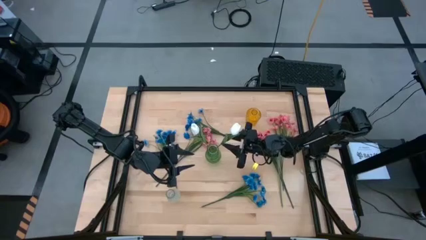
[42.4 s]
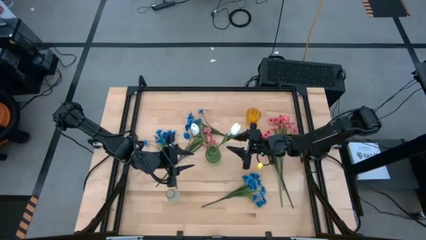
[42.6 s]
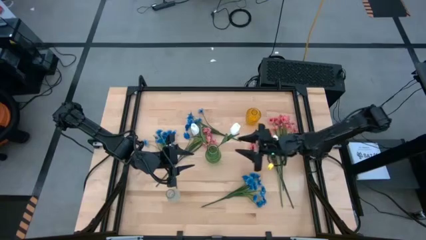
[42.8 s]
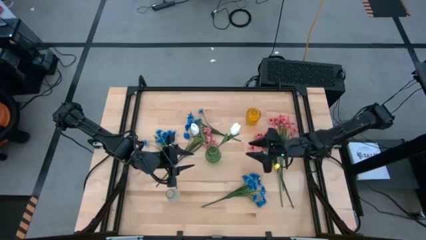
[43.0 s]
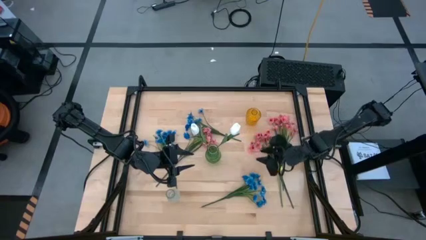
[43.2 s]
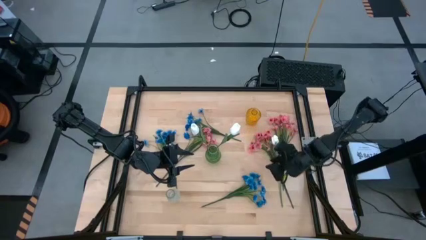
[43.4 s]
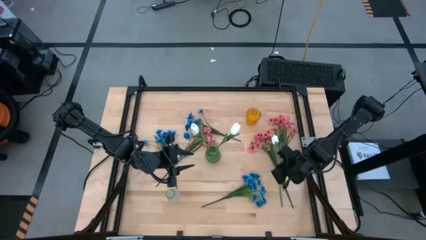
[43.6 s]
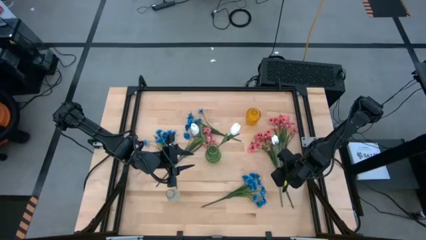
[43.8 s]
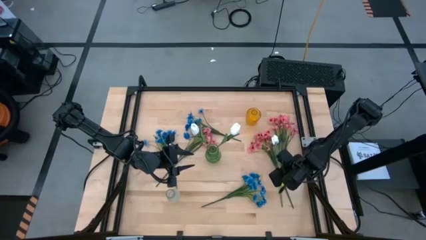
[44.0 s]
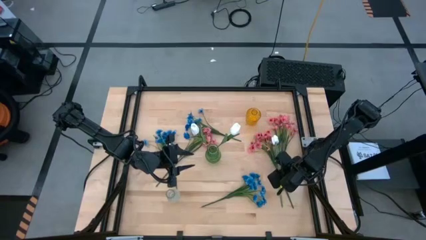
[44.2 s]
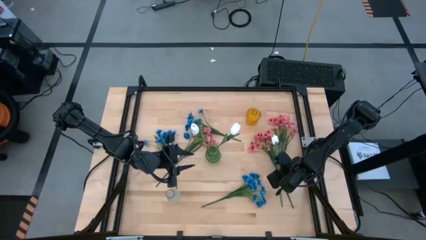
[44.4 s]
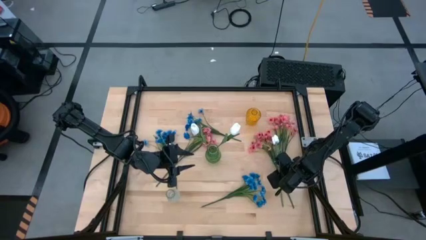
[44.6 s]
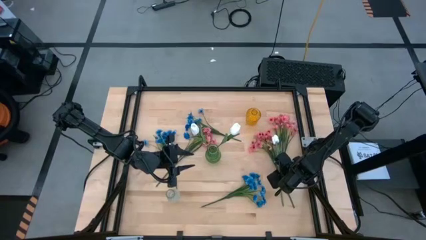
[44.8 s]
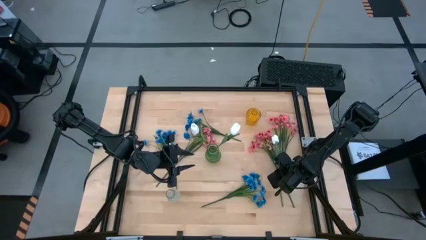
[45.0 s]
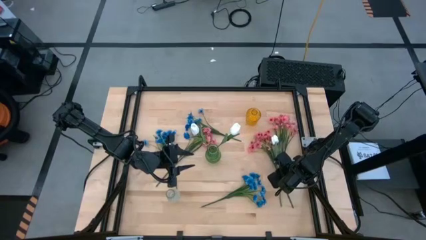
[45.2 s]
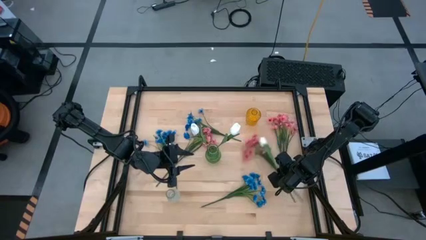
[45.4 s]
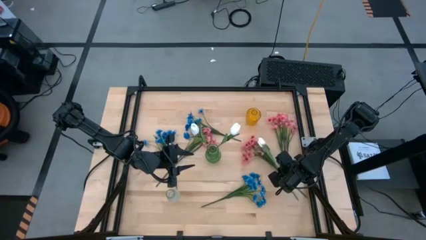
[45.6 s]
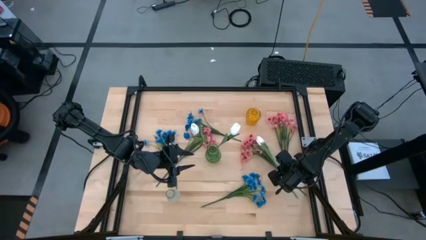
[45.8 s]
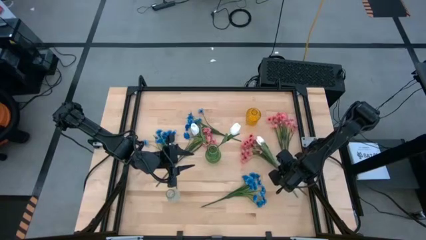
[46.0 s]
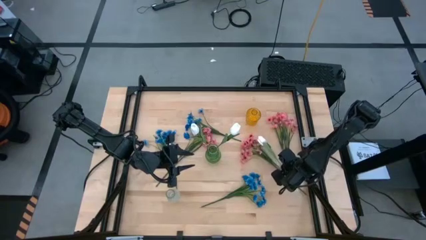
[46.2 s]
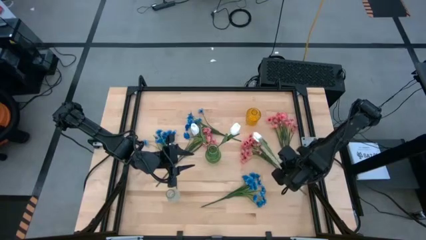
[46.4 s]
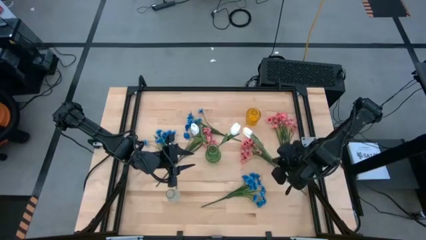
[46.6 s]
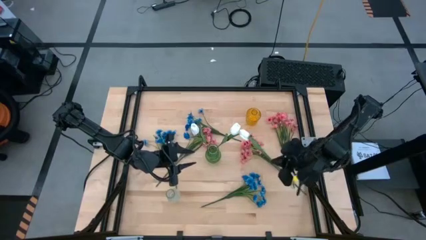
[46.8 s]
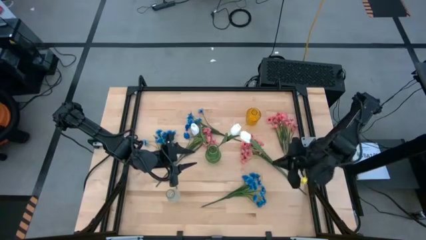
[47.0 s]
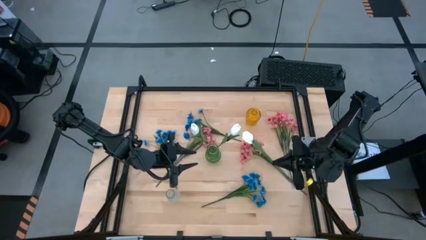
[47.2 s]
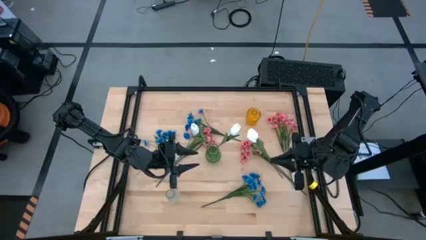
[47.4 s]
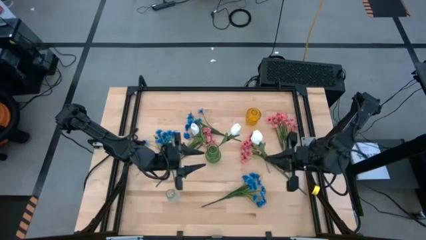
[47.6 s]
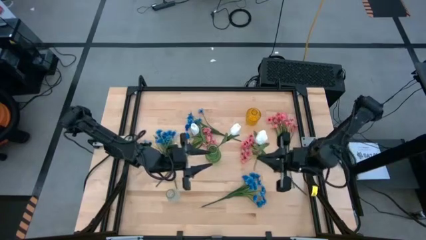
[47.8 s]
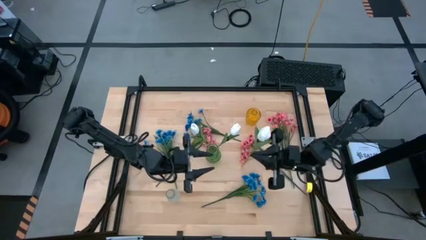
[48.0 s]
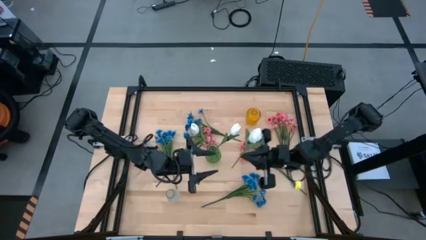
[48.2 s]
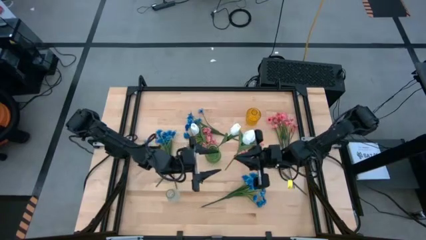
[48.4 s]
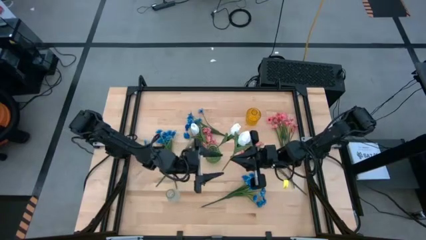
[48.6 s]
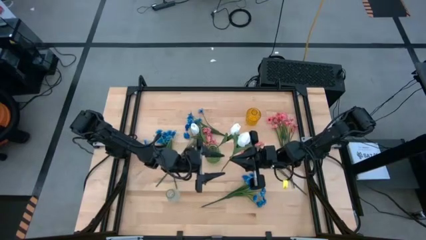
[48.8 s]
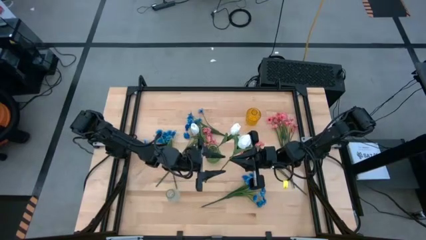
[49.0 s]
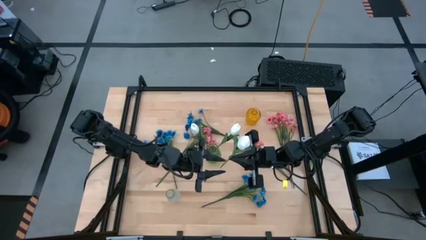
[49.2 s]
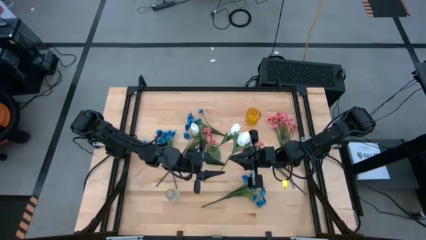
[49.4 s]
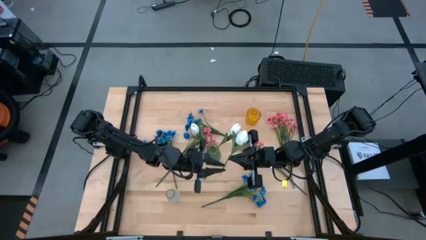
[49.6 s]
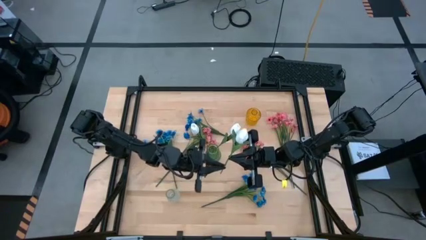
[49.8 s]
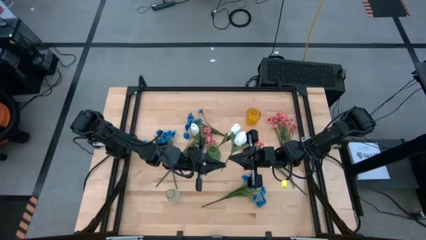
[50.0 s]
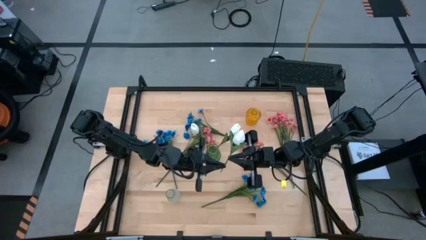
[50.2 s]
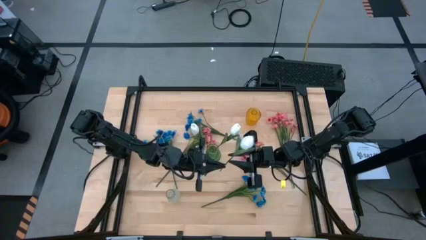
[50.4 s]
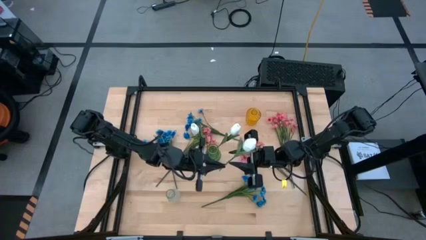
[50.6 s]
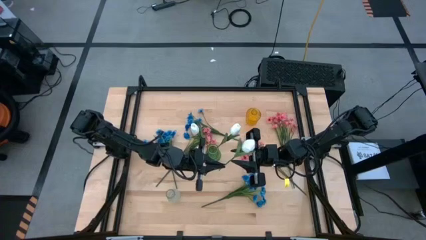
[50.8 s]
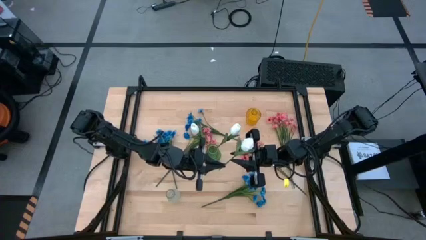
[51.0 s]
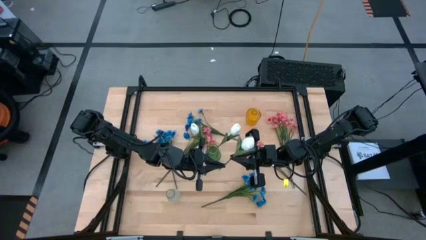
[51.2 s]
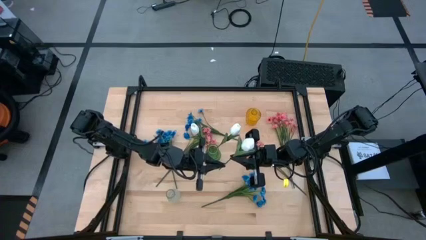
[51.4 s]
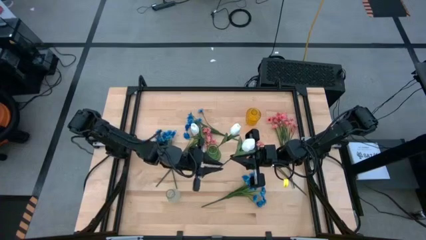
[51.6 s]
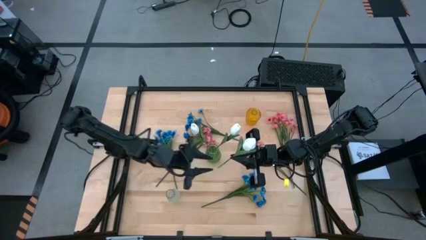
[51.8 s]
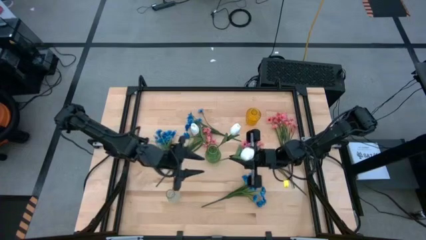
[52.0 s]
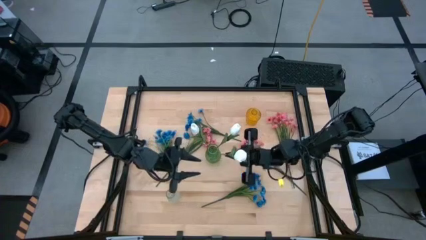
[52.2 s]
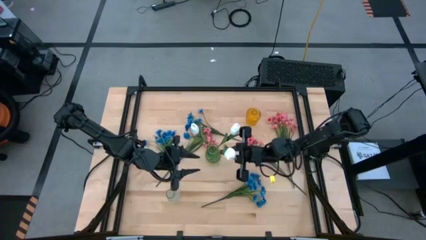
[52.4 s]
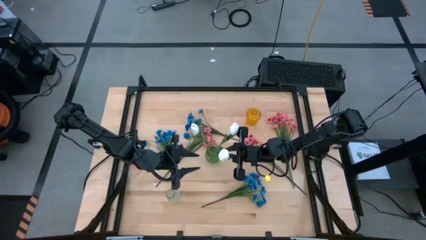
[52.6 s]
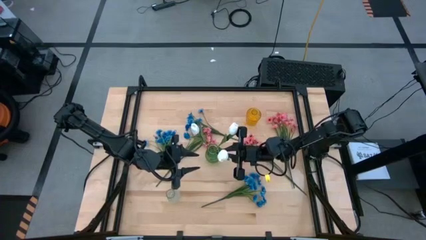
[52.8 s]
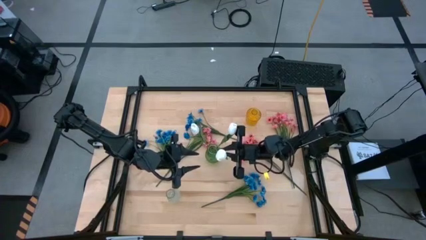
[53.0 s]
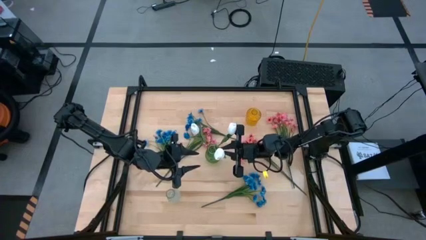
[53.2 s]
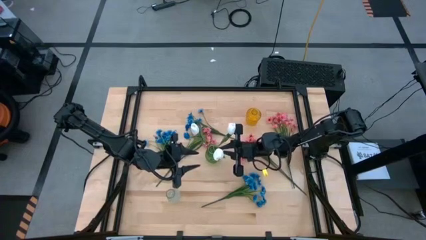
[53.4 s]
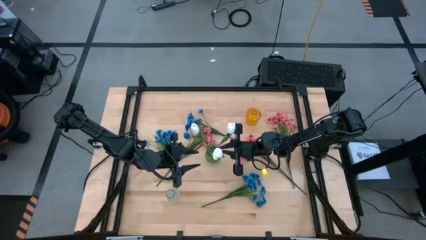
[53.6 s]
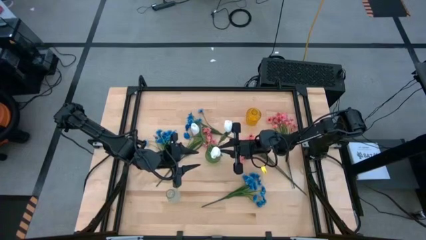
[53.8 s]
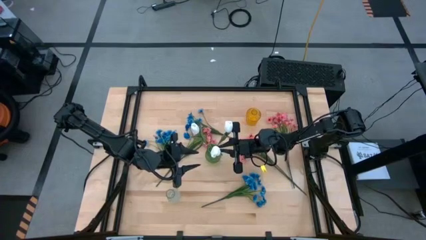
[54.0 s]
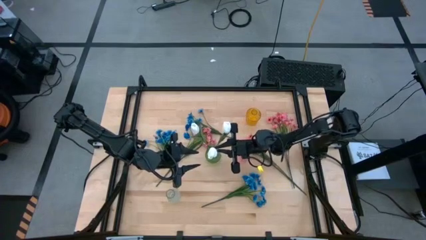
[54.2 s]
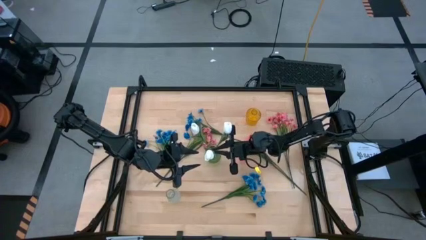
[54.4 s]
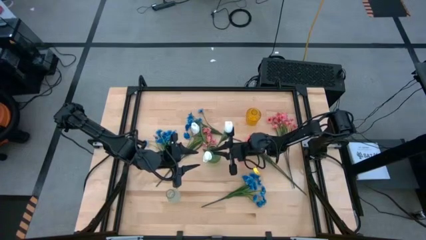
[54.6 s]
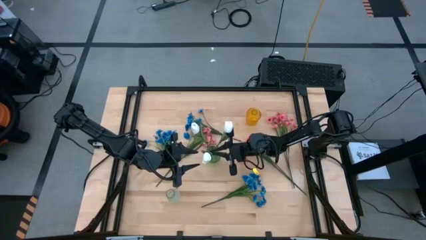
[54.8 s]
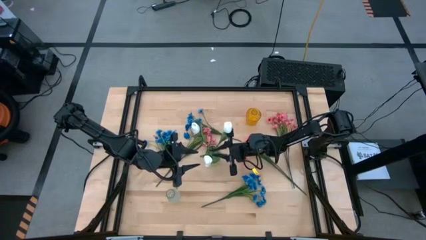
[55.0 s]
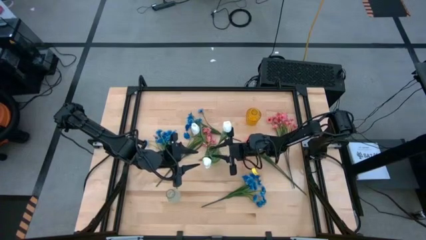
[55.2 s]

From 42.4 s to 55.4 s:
Task: Sort flowers into vase by color
Put the white flower into the green vase
